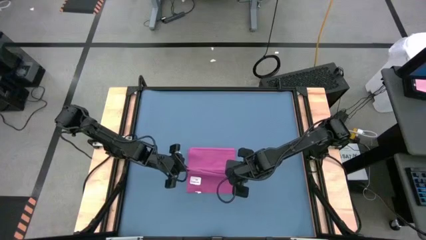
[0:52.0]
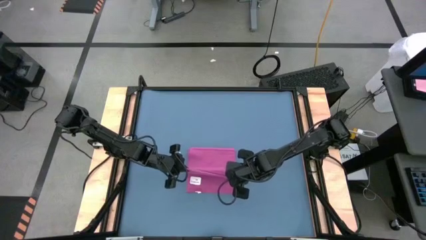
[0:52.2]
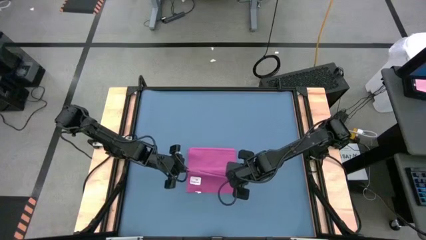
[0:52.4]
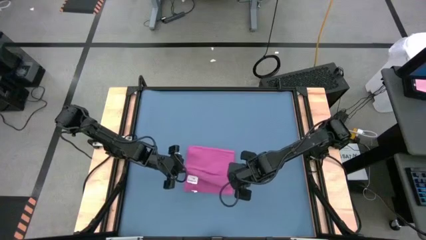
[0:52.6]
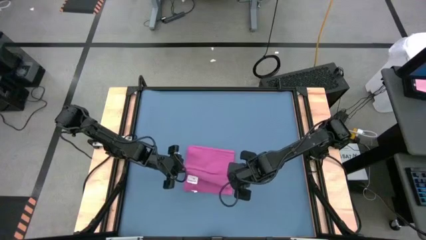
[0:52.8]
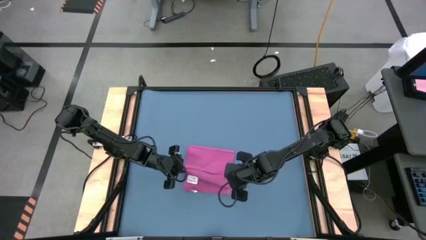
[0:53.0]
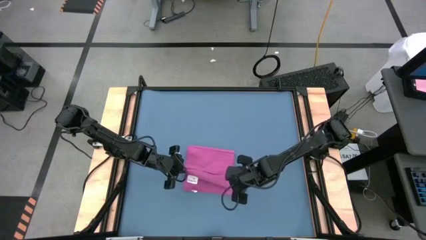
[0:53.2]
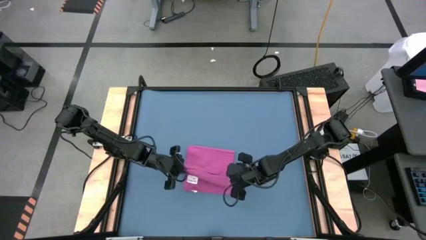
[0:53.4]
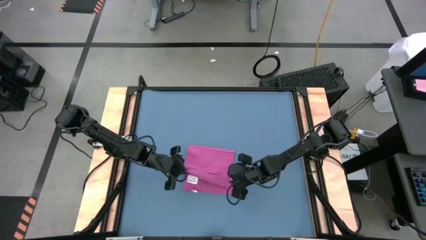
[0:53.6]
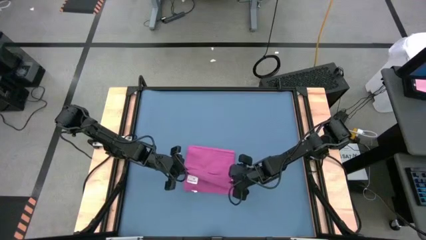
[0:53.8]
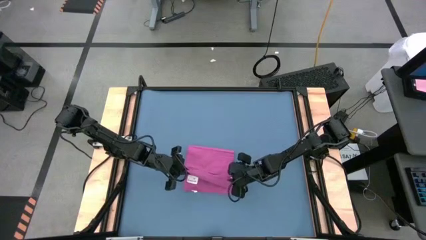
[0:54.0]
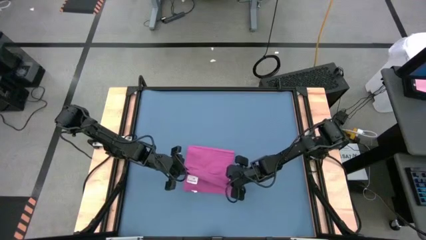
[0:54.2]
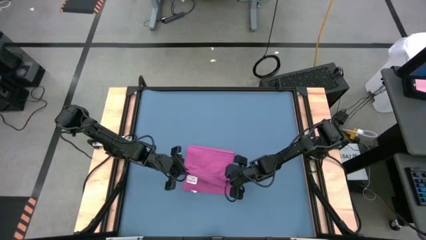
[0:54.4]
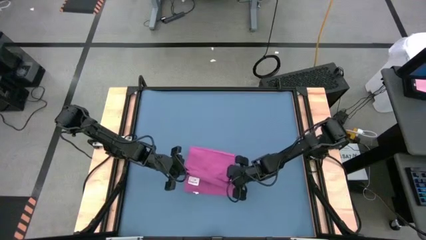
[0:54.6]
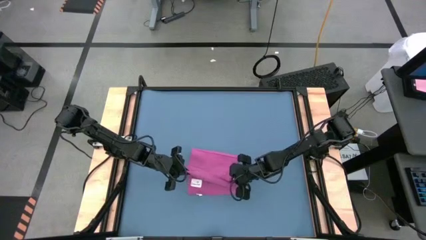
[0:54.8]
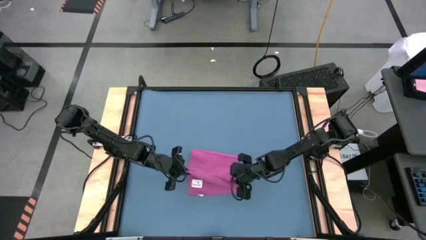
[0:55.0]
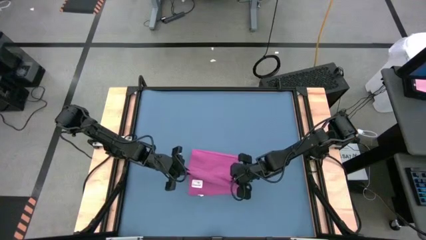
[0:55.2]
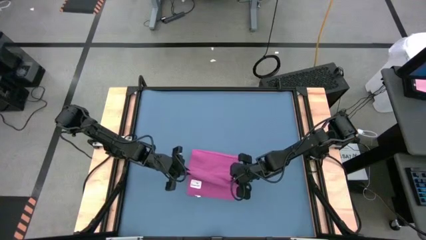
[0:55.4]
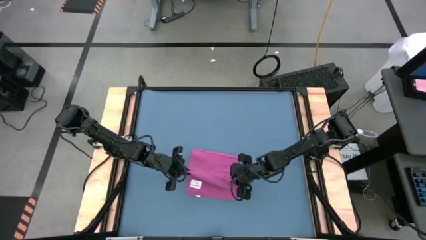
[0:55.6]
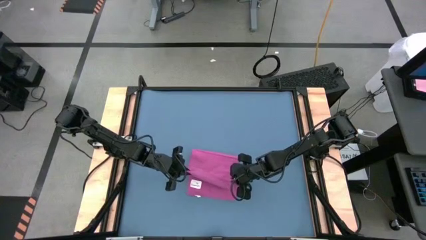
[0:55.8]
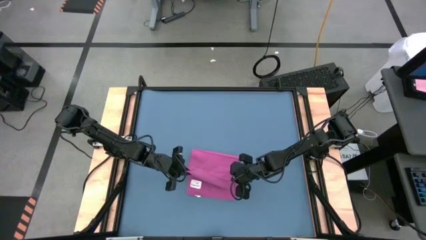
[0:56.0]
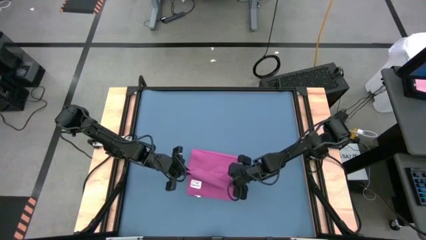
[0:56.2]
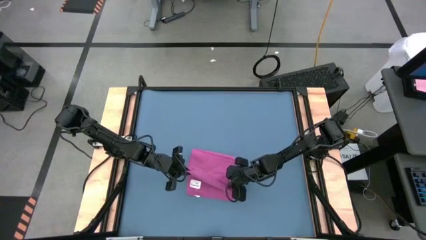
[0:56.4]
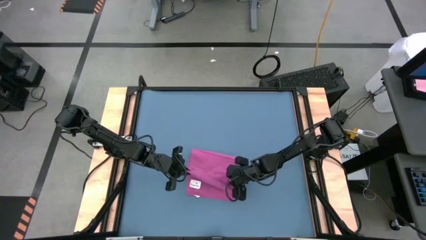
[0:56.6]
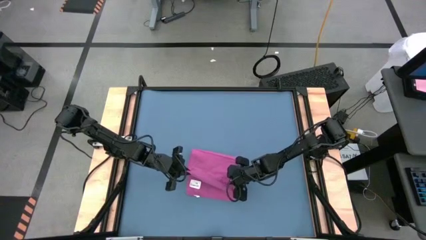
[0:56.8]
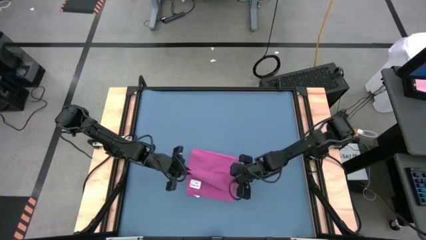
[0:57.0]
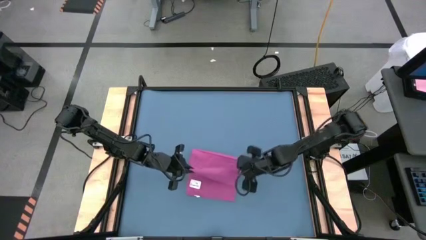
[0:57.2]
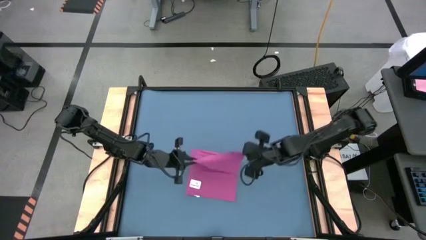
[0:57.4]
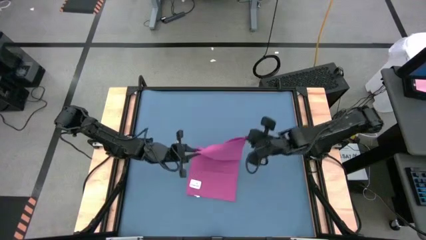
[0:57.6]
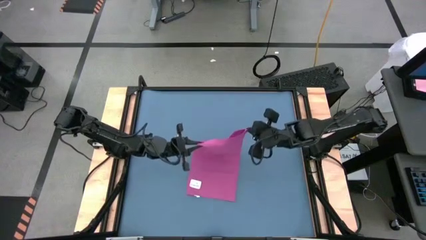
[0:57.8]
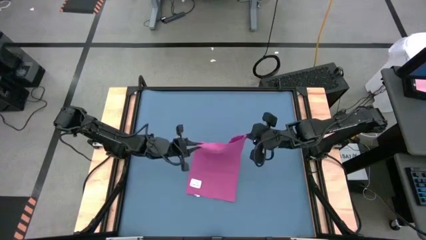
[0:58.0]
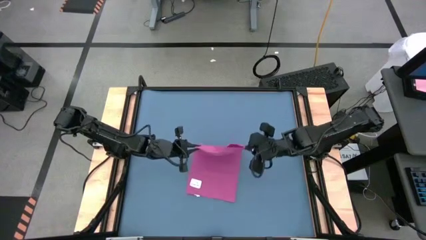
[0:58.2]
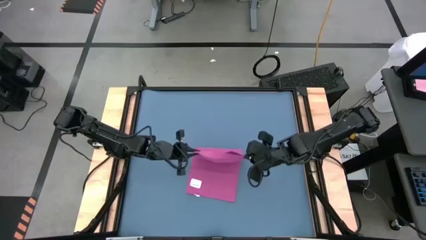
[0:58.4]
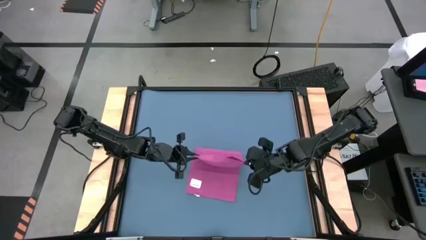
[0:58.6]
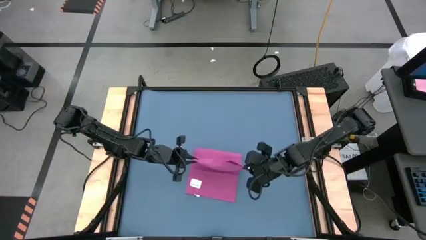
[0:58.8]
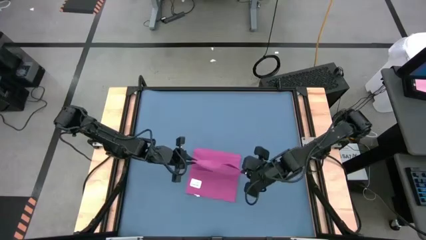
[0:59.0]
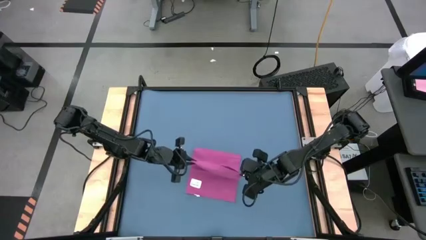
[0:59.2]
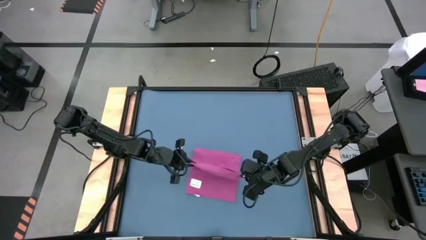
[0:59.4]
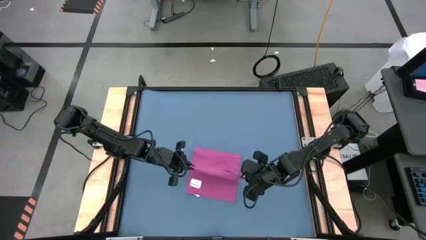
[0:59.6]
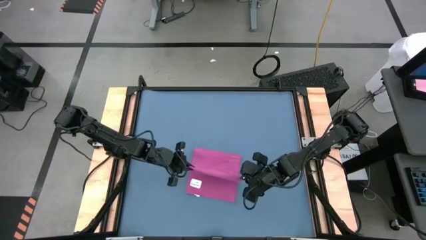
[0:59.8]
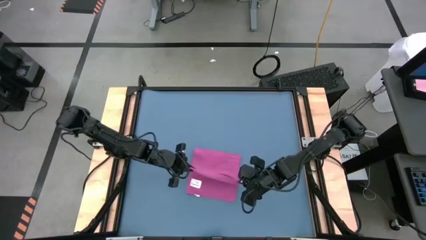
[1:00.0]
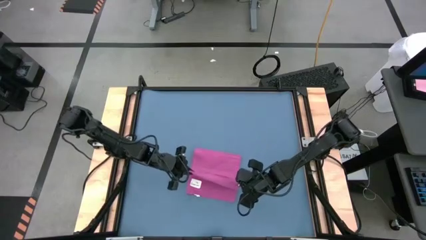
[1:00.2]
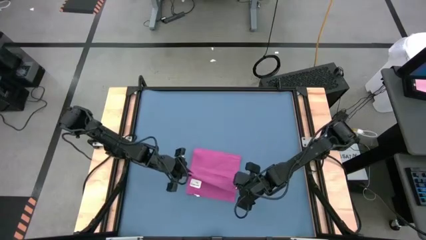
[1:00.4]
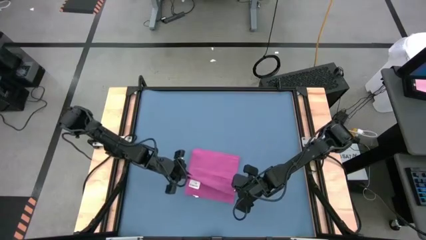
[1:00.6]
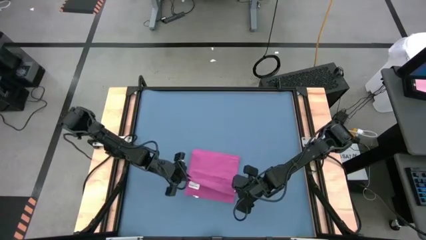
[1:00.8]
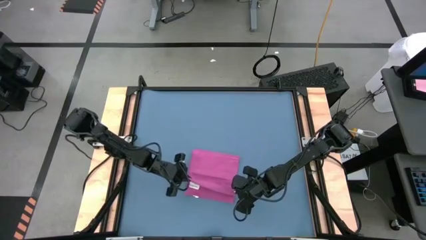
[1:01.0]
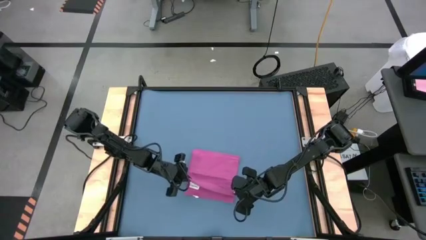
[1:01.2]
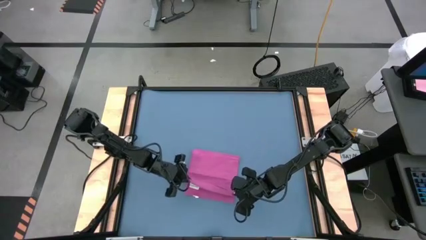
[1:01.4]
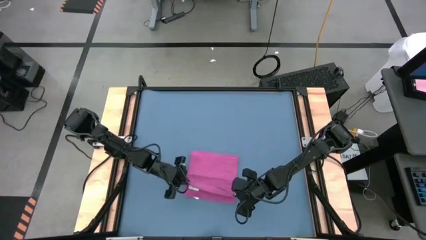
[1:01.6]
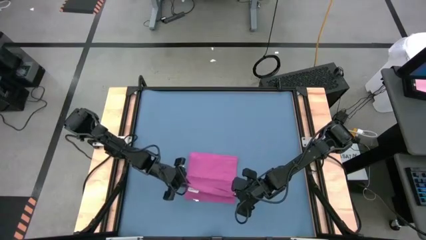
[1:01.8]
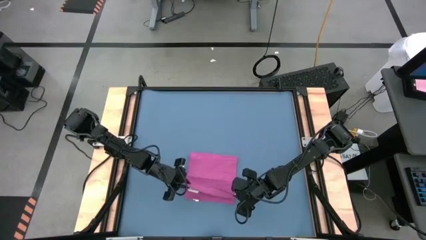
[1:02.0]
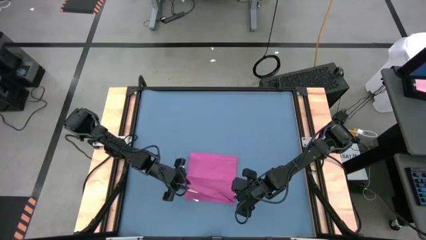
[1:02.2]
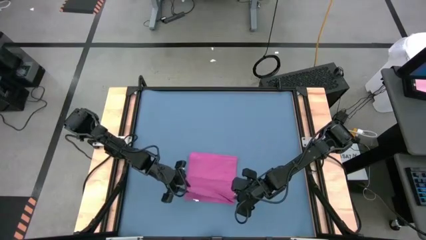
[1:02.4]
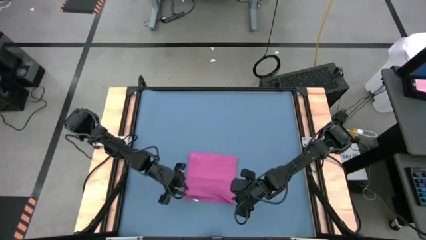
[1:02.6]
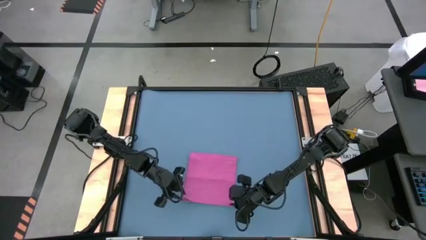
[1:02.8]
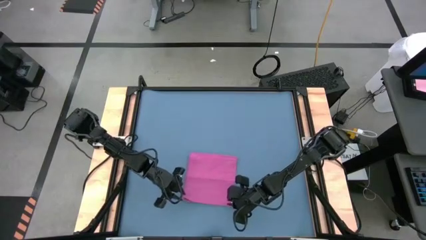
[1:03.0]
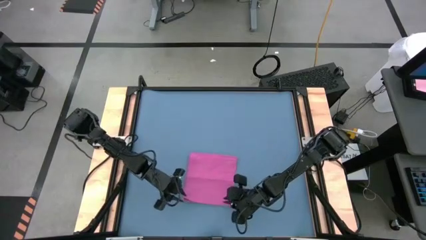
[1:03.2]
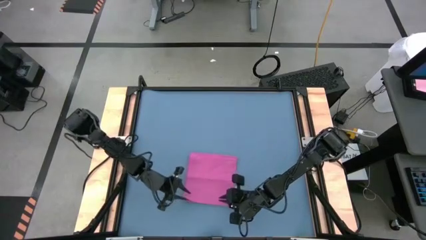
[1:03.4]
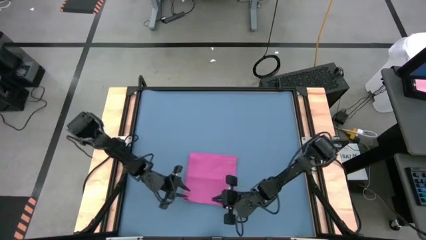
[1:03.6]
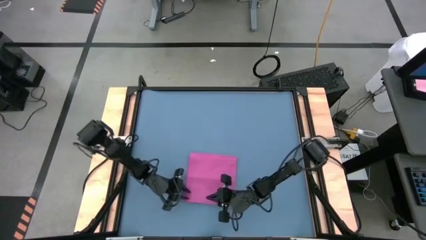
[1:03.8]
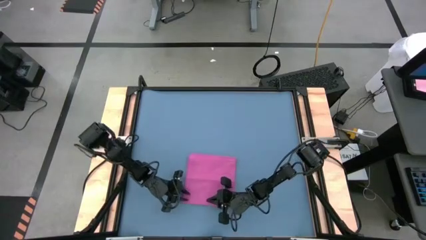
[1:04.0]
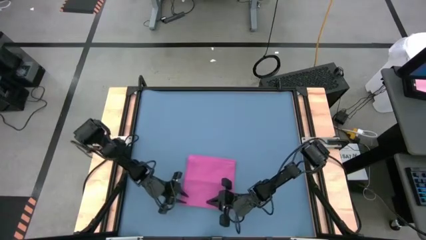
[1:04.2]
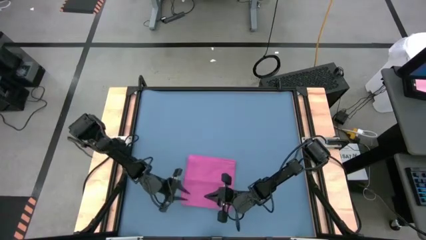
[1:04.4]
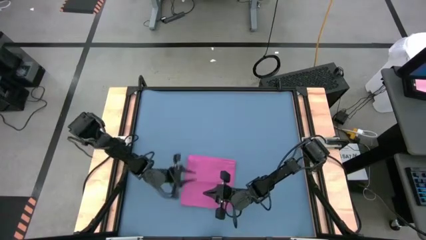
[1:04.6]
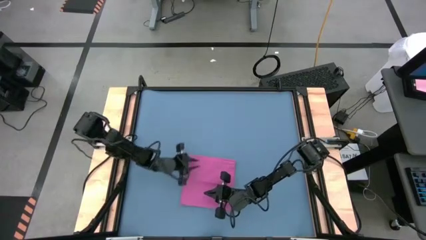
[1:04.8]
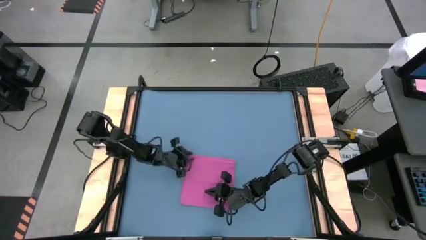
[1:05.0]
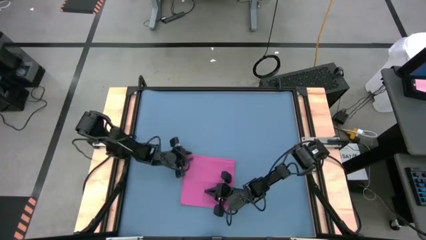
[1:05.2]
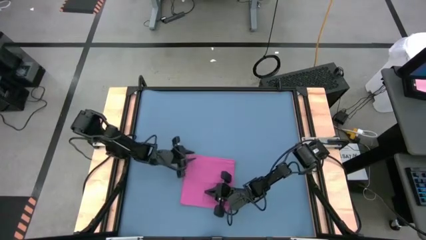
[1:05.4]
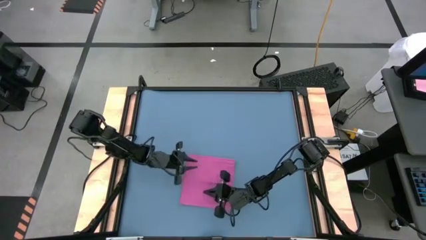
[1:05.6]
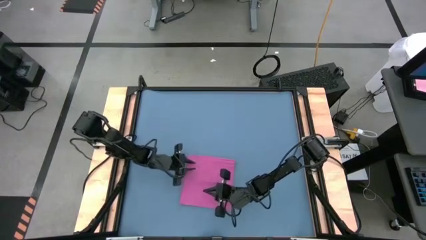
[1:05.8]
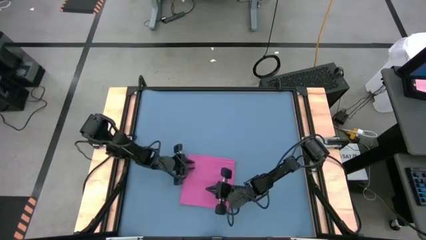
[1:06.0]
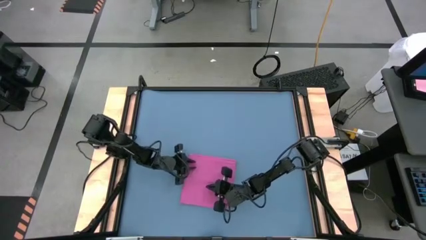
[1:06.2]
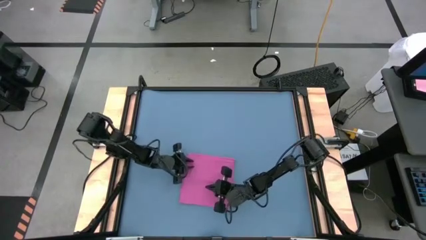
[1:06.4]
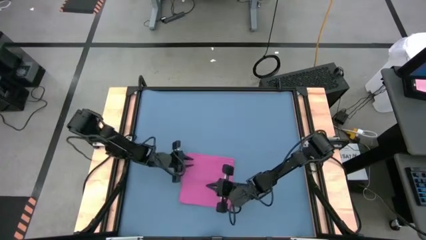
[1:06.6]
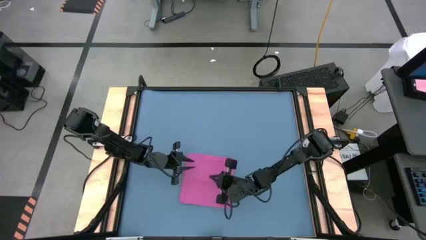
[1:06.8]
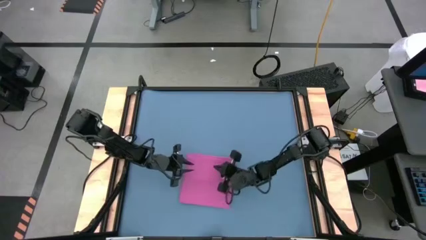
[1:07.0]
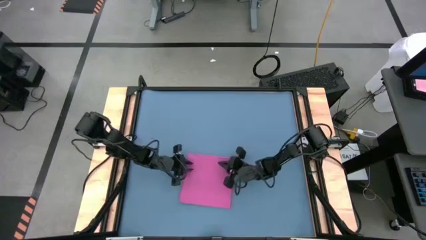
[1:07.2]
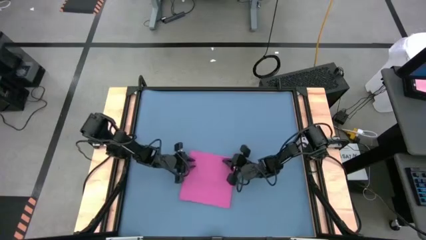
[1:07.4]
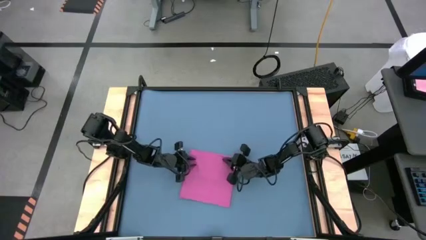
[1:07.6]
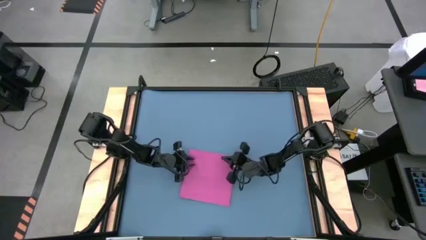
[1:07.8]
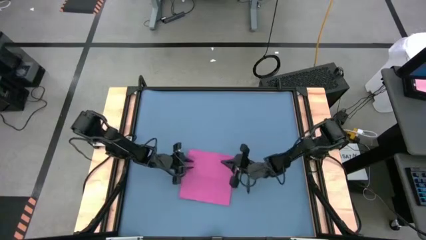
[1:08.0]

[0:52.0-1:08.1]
Task: Roll towel
Fold the light red towel
